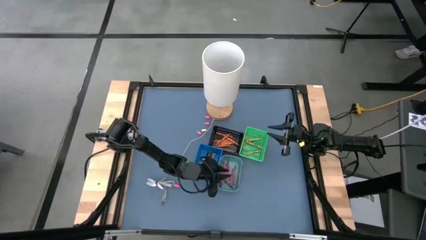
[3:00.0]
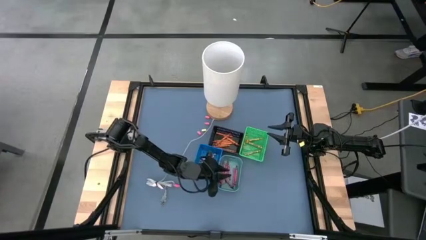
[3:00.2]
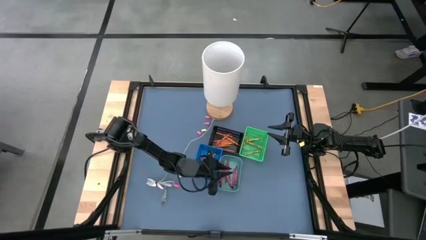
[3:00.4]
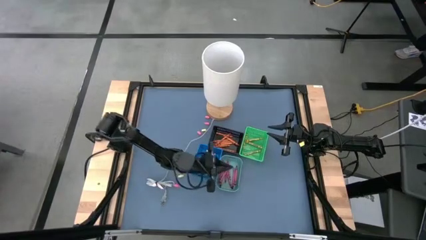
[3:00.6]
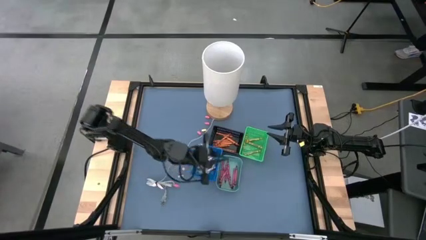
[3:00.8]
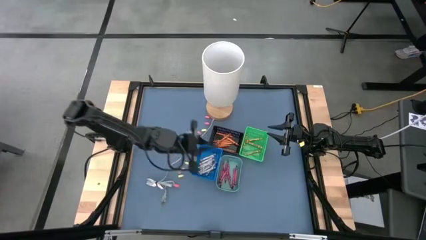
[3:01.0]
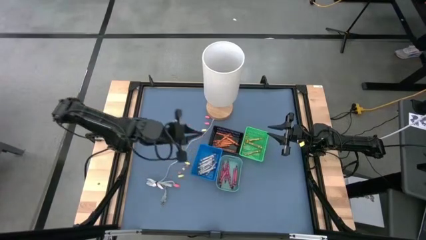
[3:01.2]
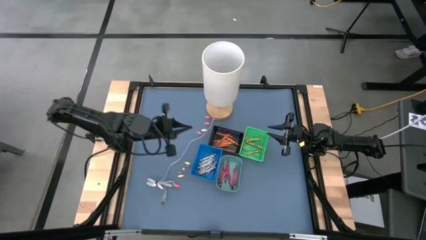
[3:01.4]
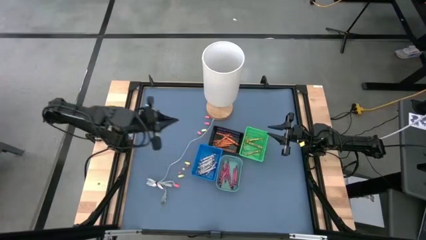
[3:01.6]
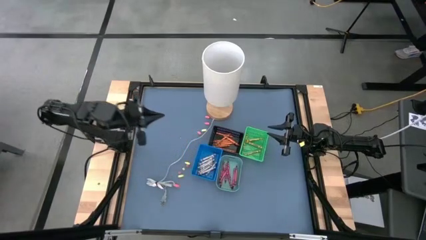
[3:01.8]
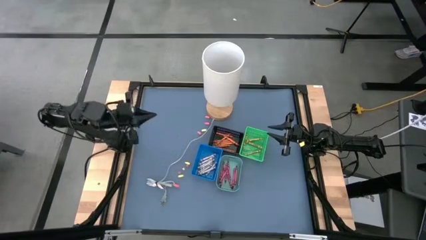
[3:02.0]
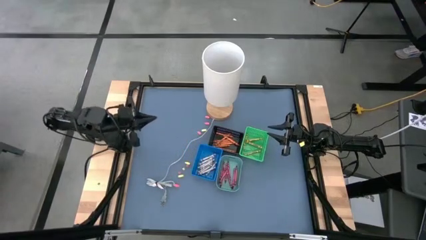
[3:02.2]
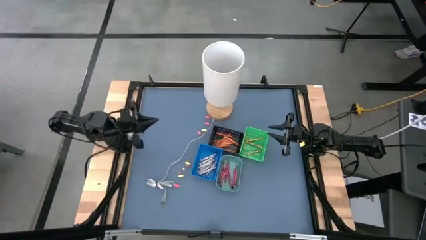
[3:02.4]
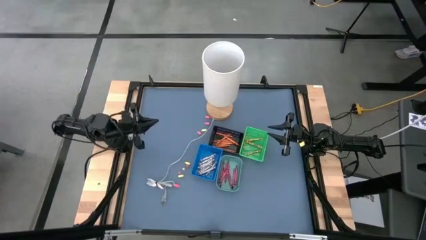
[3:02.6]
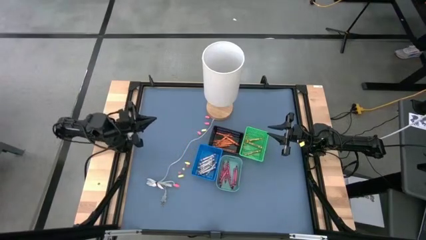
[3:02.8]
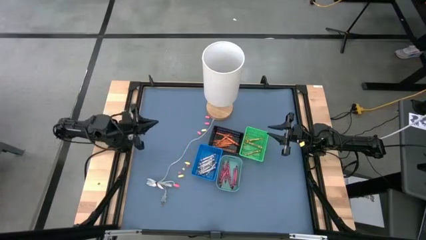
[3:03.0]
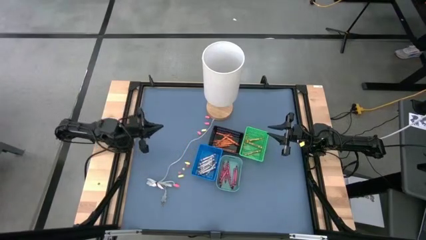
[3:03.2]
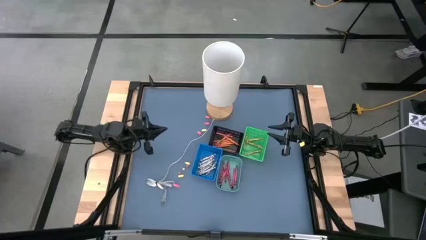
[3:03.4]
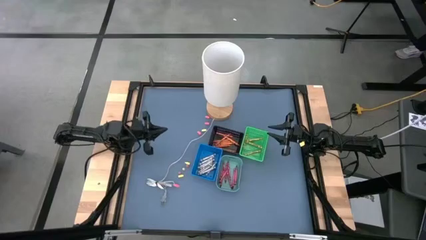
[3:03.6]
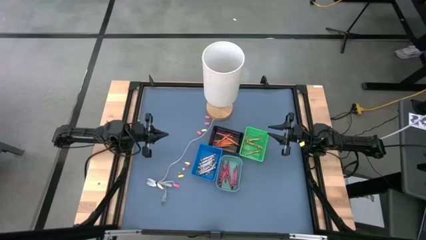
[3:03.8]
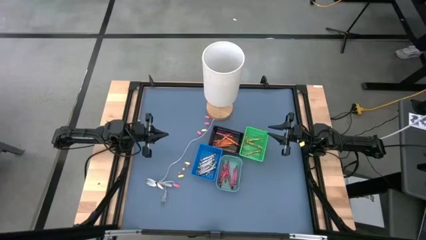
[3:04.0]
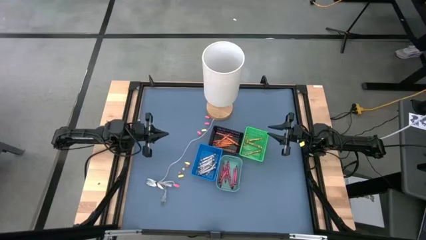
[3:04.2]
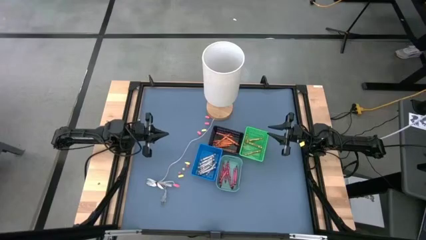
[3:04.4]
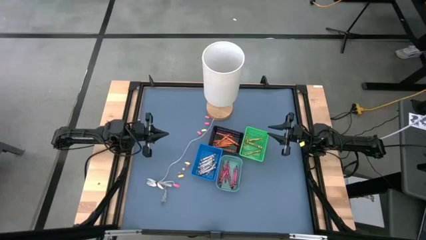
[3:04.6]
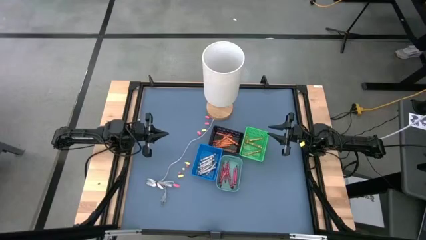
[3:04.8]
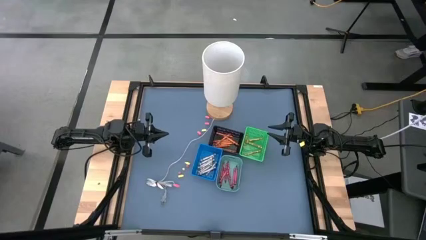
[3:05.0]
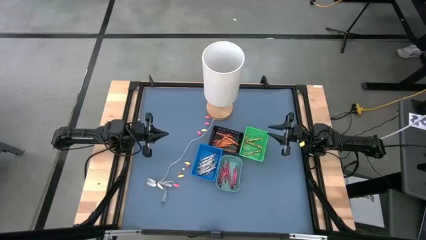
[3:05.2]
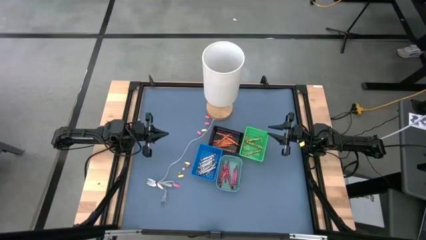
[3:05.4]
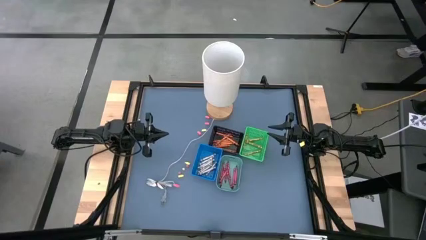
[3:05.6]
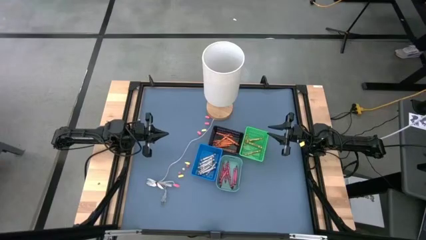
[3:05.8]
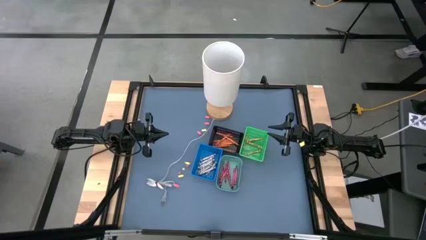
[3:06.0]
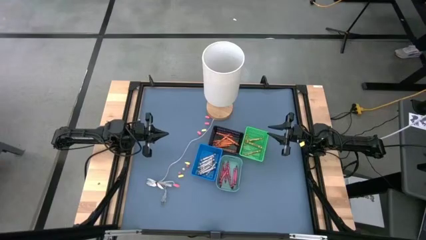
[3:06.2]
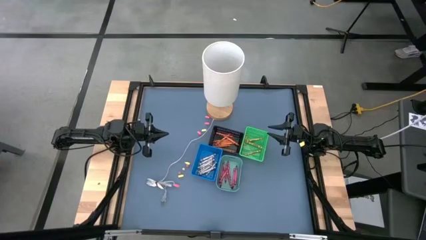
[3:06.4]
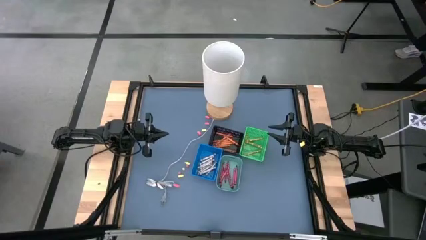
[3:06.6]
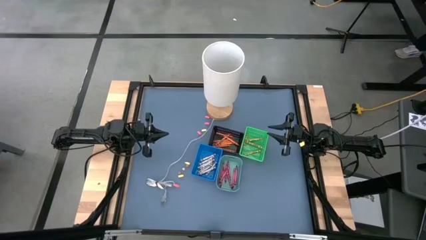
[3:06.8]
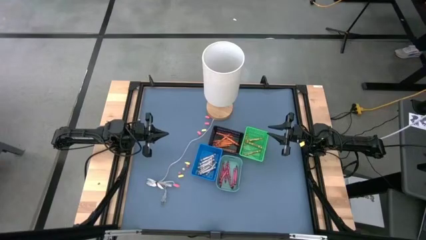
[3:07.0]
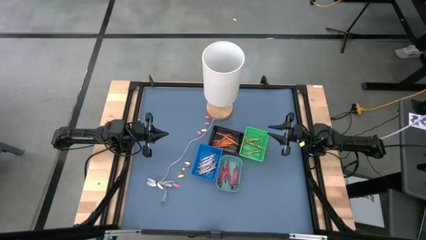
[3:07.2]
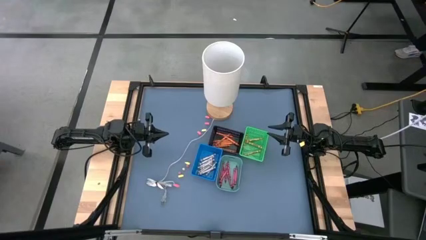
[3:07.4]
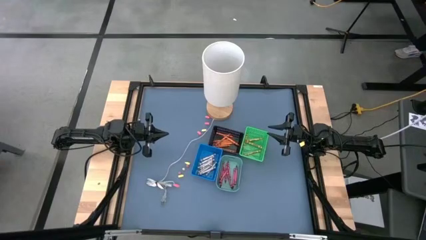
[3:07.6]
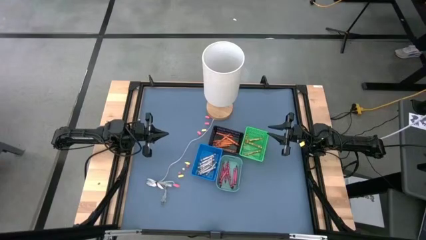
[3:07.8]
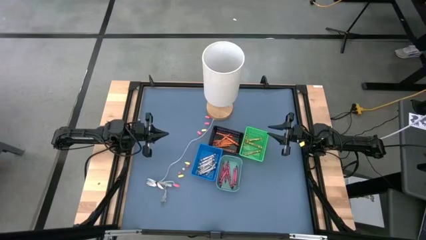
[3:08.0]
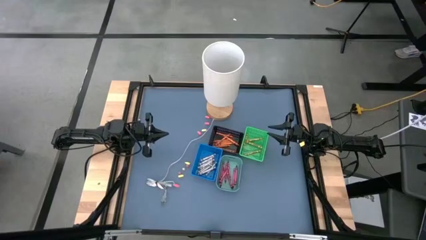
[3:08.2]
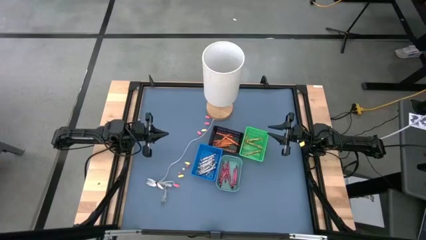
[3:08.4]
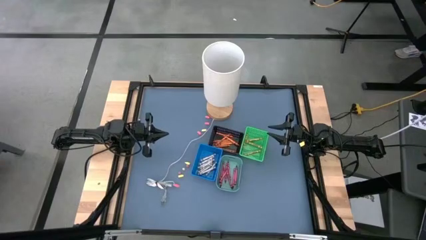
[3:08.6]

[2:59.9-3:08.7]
Task: Sort crayons
Return to Home Position

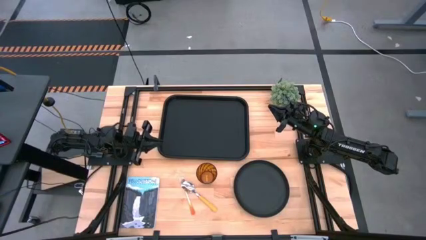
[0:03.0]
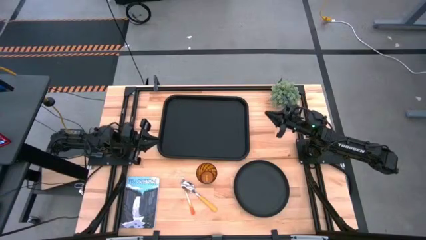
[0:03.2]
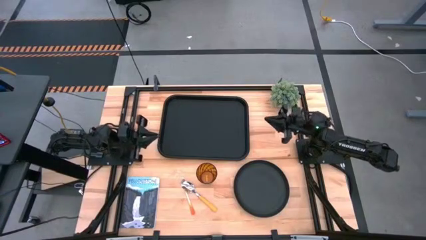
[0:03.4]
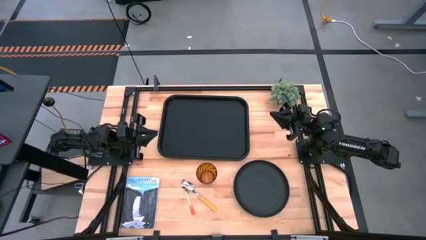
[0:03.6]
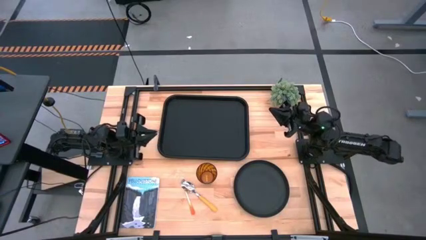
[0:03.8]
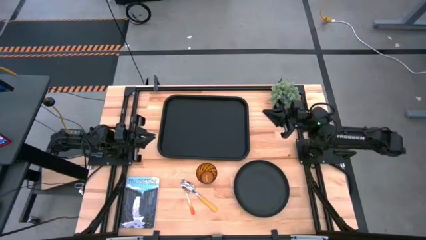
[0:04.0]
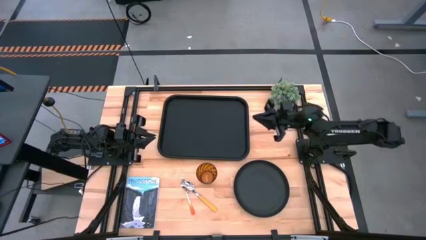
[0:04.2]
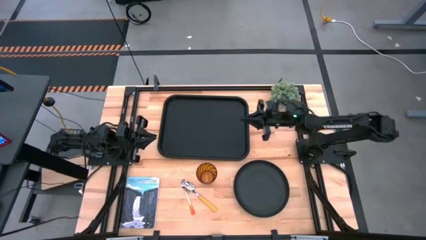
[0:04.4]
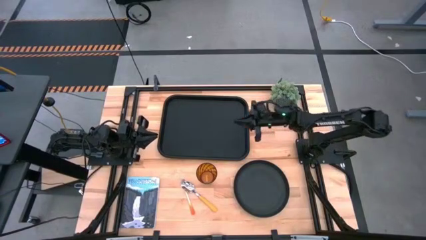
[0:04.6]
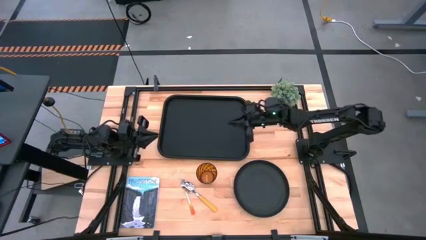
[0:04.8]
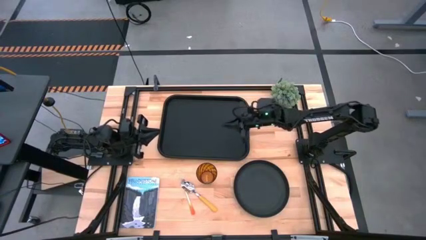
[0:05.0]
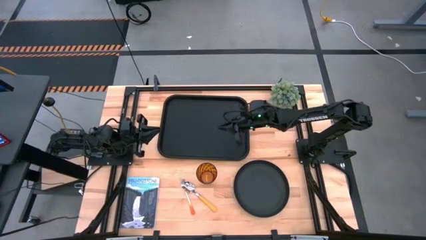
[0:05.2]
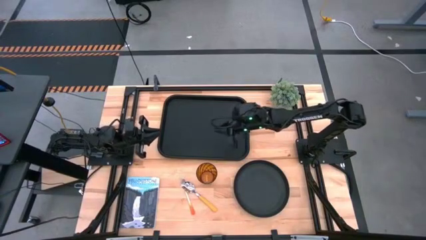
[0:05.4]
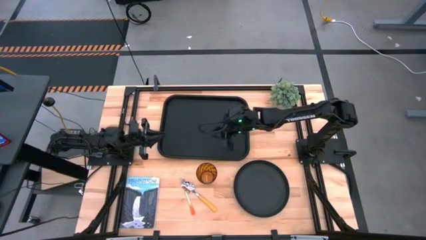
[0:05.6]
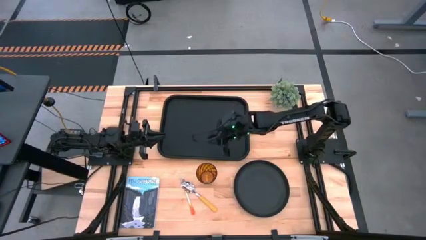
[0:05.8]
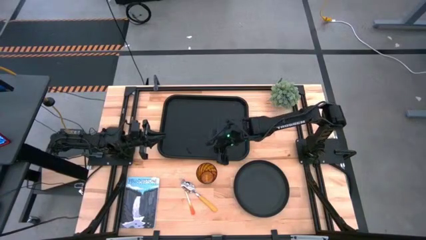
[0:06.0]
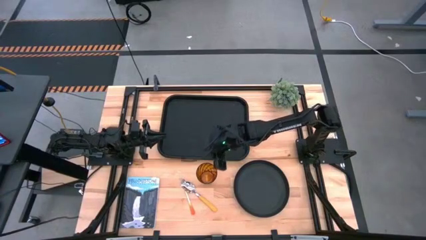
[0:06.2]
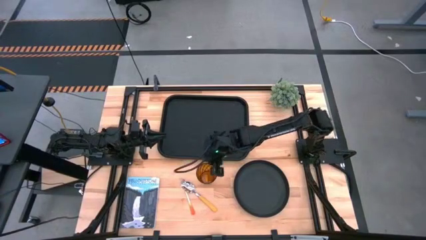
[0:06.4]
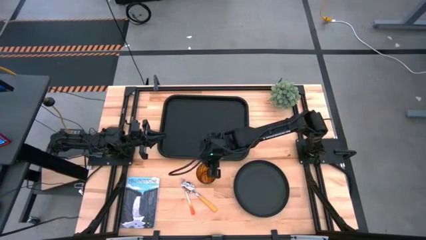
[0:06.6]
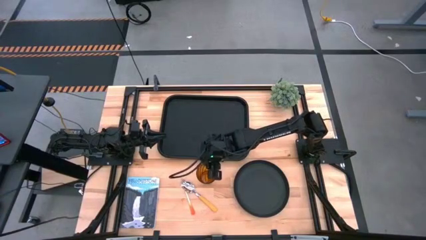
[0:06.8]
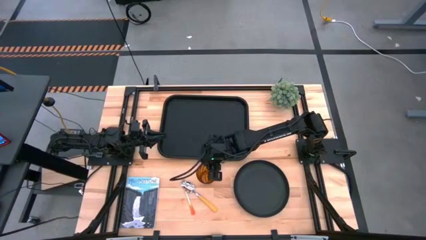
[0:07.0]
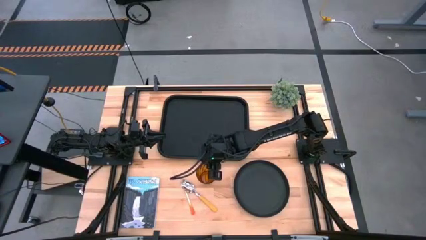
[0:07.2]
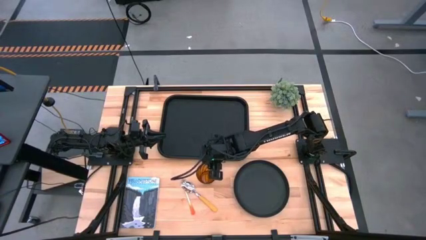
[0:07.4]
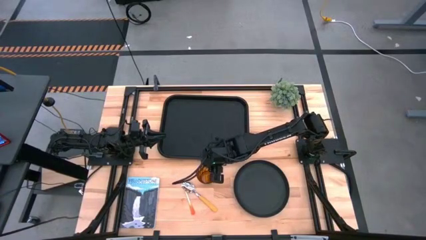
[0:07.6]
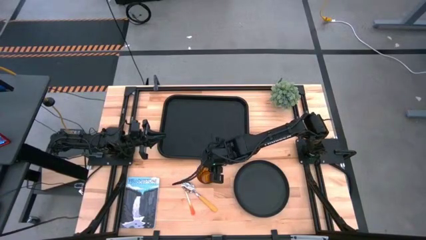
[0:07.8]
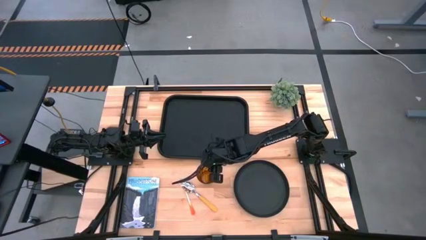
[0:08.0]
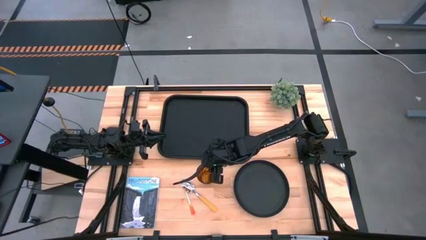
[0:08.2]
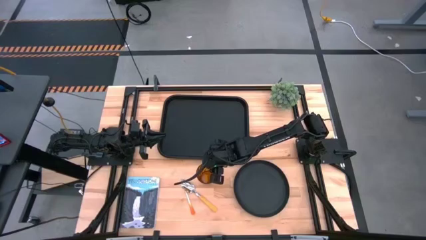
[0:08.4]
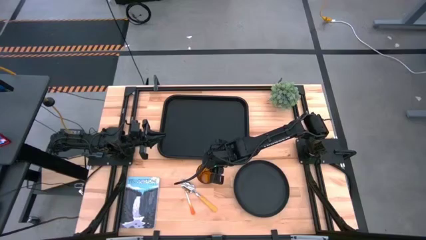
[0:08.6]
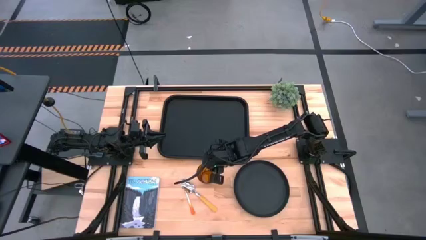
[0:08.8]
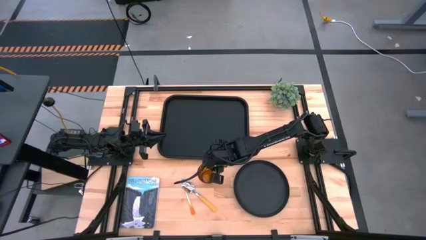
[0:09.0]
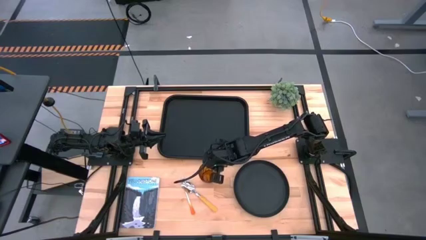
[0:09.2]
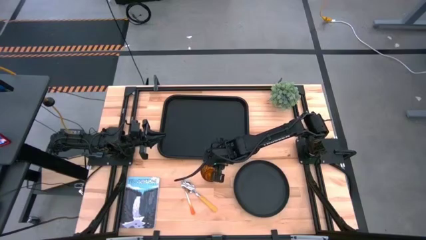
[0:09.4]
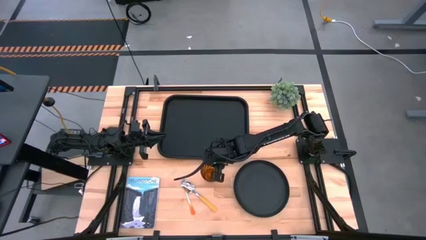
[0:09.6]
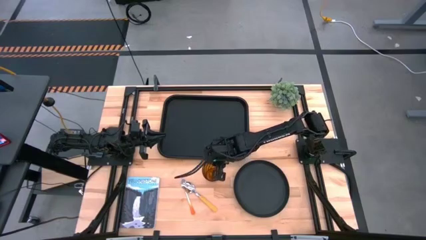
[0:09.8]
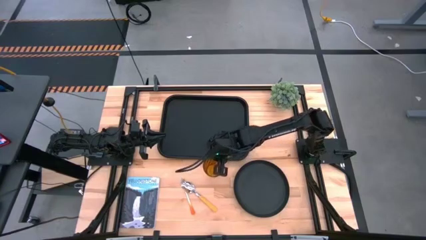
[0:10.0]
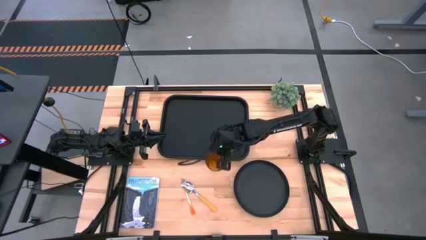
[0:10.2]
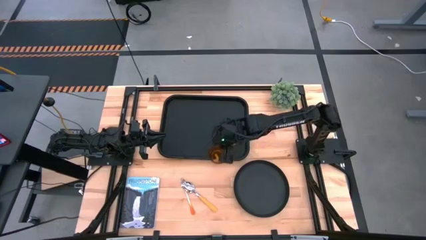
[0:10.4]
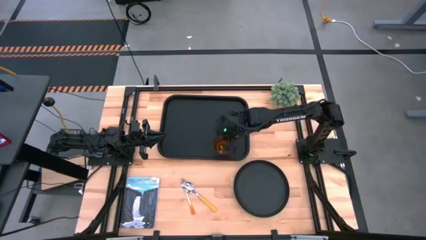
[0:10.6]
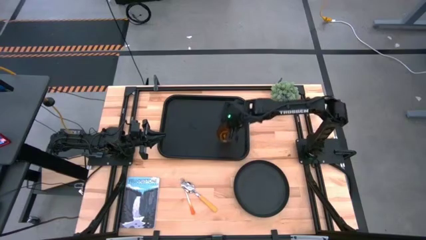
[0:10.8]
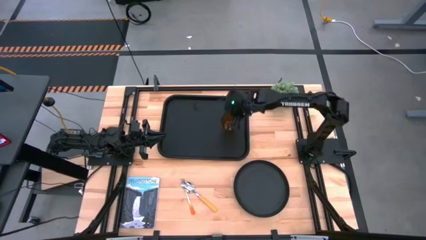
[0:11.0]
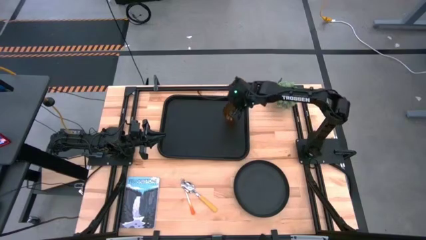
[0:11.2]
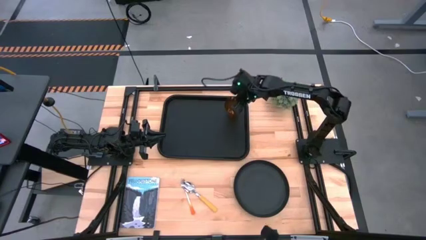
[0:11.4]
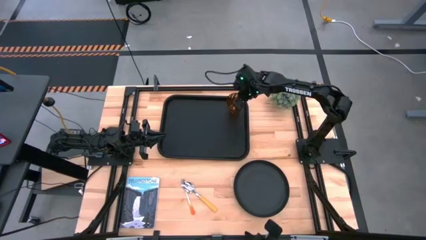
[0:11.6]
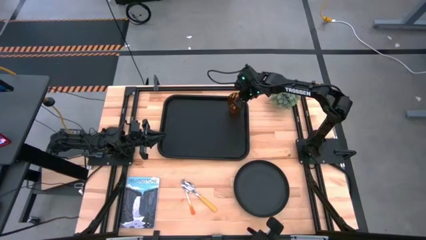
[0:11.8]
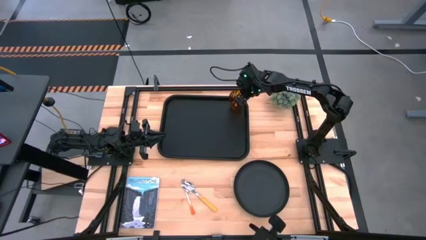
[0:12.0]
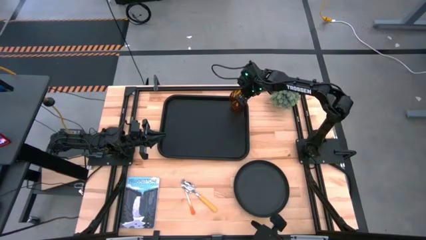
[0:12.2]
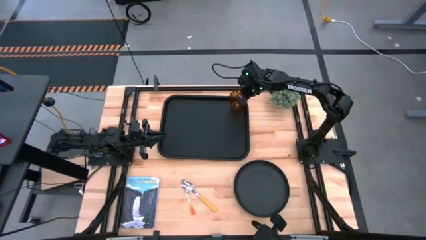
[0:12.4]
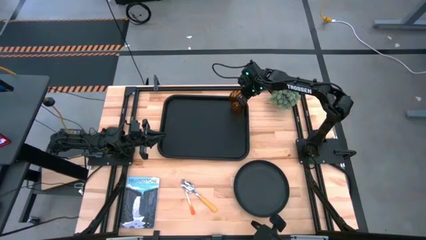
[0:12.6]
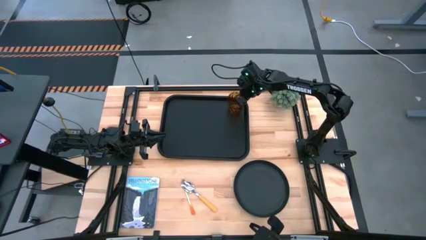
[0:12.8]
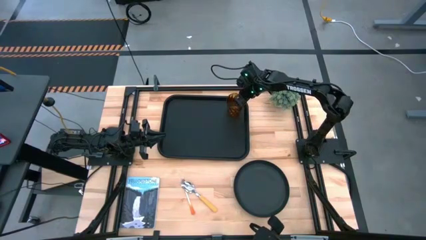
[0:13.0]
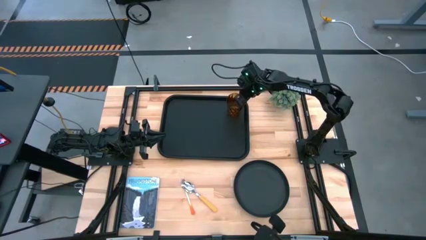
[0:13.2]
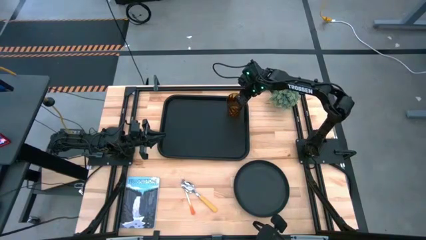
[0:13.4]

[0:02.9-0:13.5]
Task: Pick and place plate/cup/fork/spoon on tray
Put the yellow cup on the black serving tray
